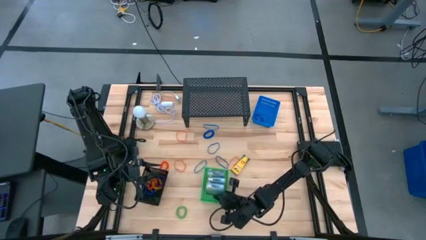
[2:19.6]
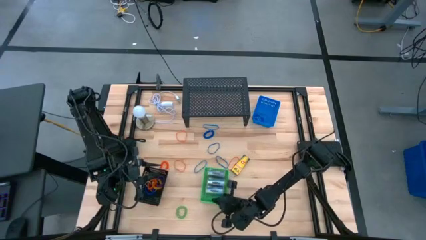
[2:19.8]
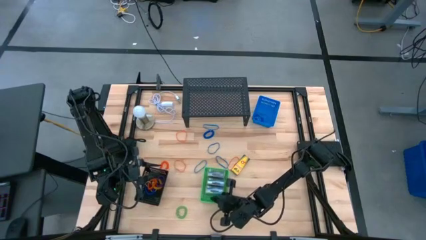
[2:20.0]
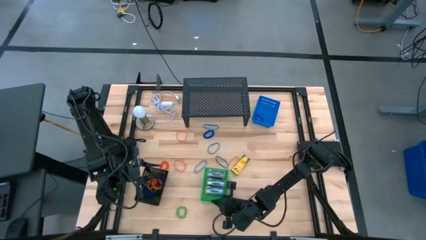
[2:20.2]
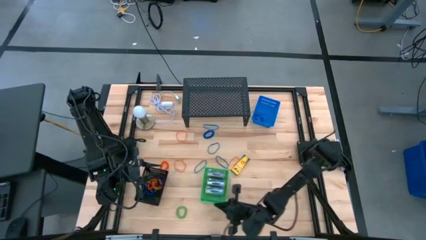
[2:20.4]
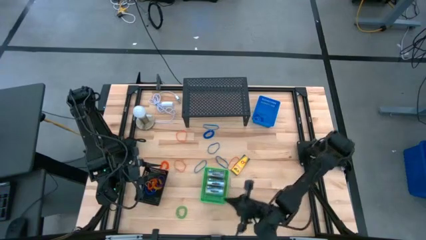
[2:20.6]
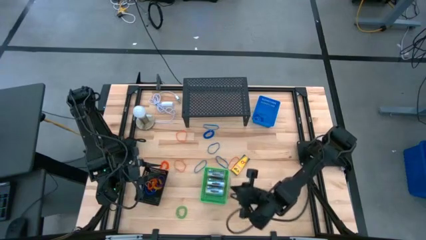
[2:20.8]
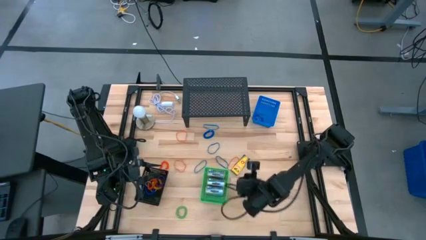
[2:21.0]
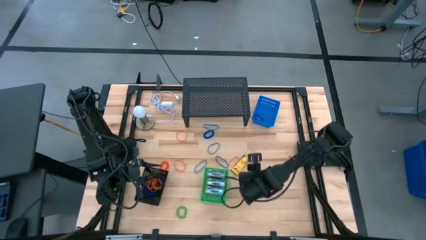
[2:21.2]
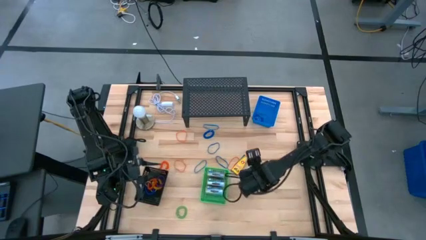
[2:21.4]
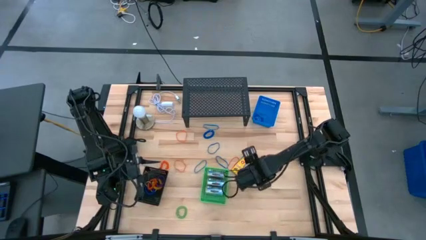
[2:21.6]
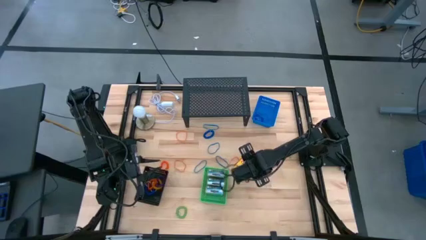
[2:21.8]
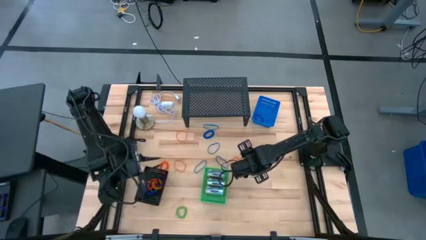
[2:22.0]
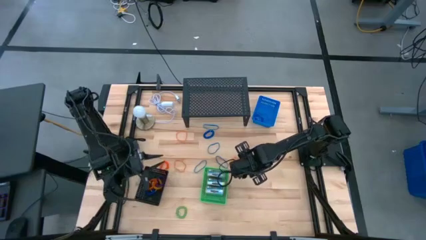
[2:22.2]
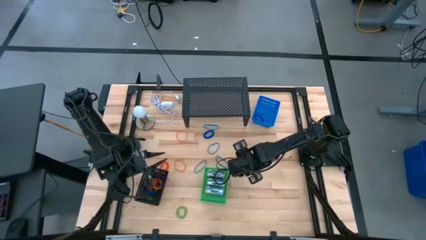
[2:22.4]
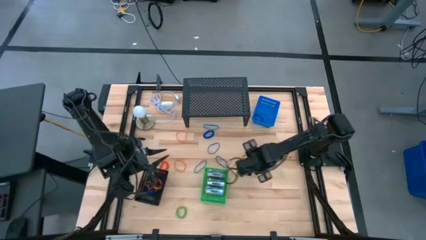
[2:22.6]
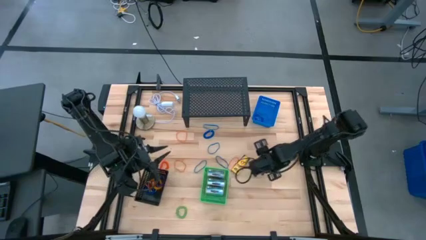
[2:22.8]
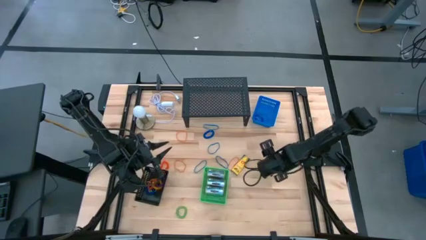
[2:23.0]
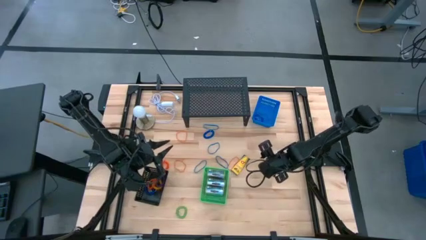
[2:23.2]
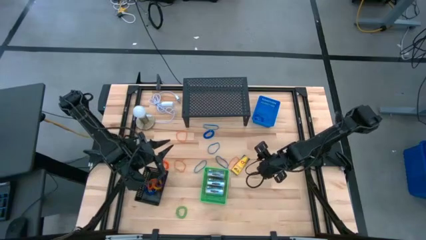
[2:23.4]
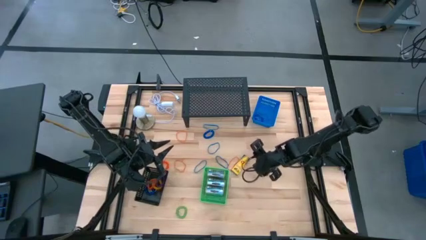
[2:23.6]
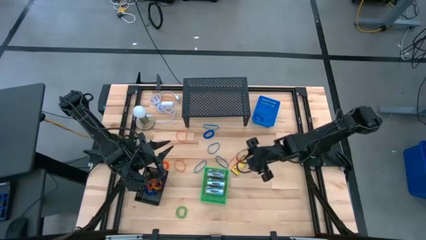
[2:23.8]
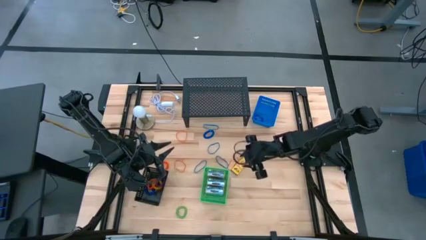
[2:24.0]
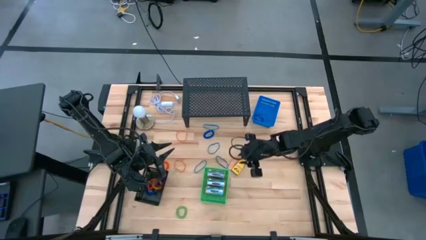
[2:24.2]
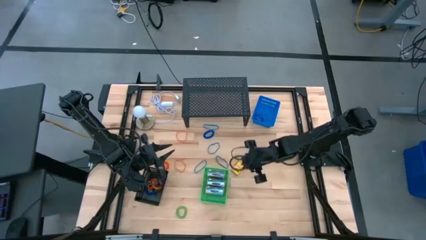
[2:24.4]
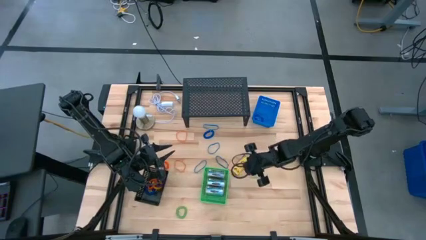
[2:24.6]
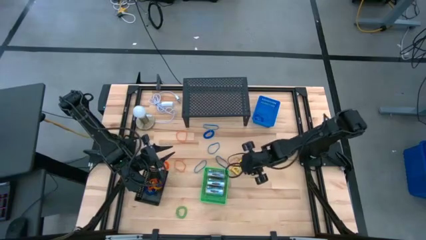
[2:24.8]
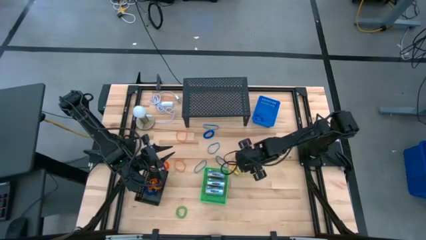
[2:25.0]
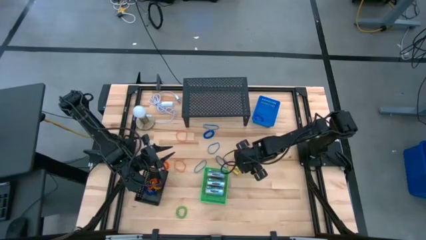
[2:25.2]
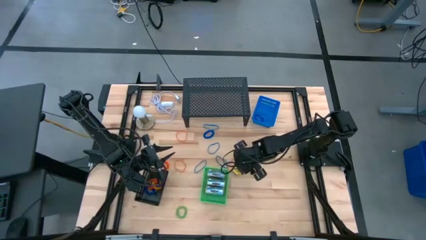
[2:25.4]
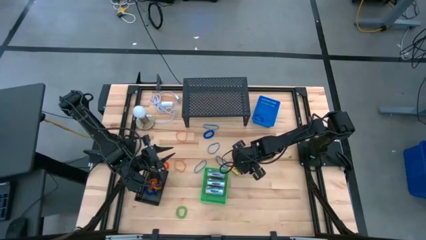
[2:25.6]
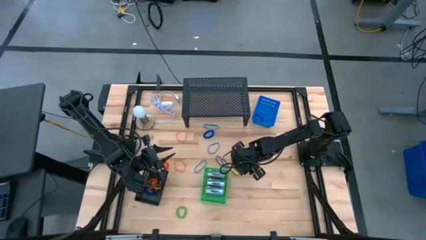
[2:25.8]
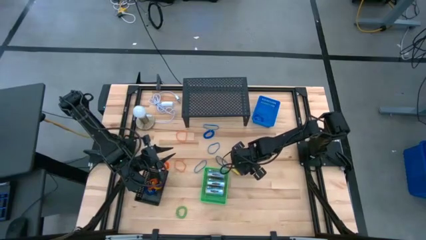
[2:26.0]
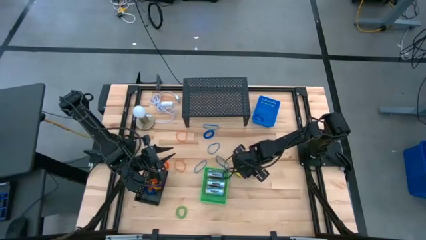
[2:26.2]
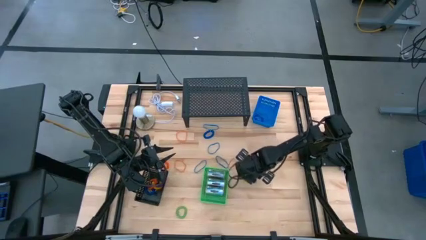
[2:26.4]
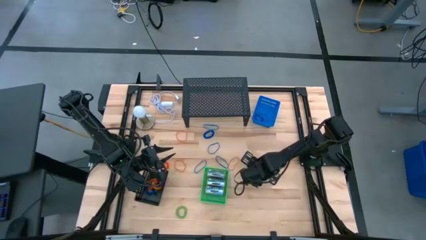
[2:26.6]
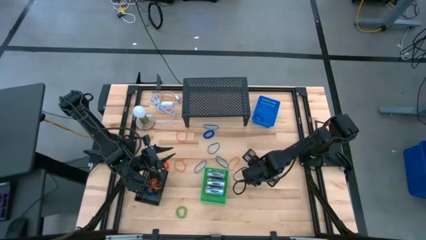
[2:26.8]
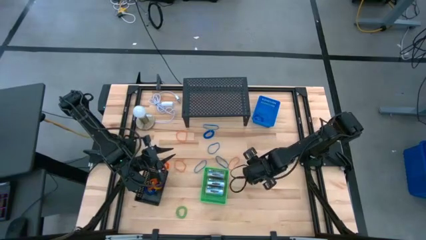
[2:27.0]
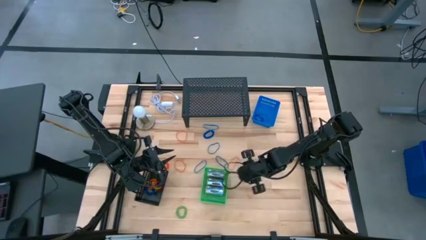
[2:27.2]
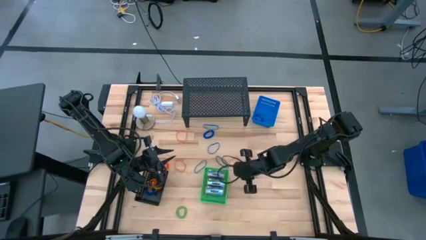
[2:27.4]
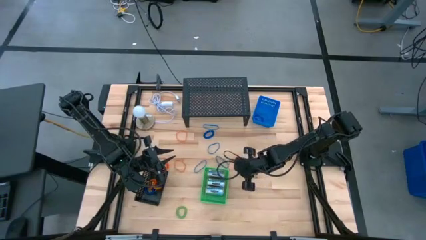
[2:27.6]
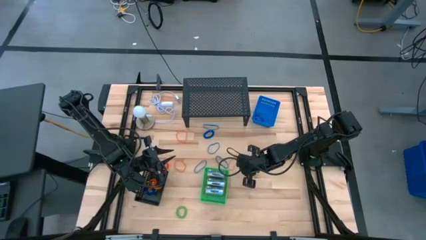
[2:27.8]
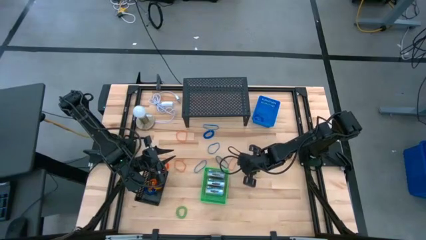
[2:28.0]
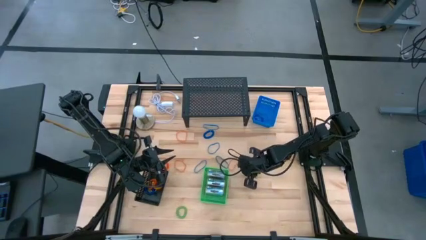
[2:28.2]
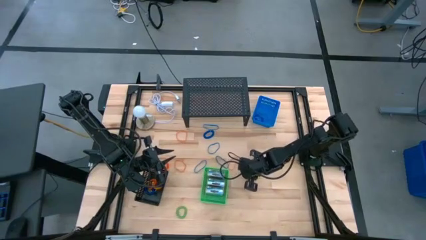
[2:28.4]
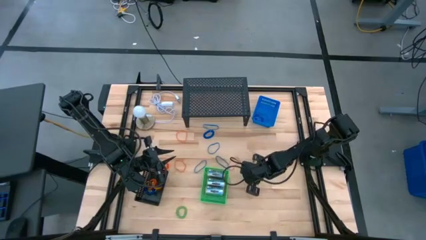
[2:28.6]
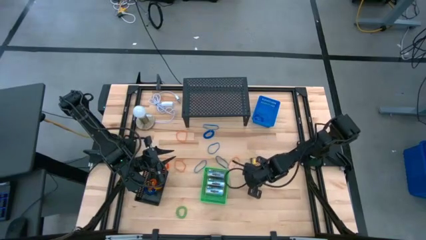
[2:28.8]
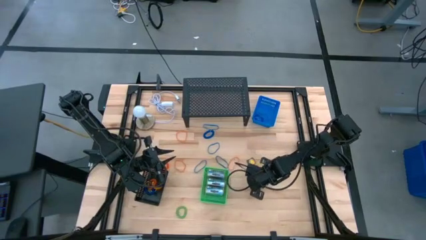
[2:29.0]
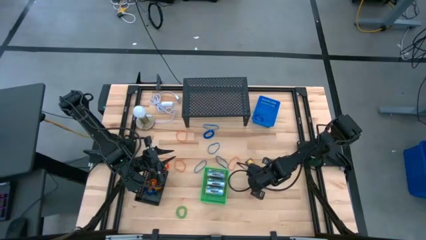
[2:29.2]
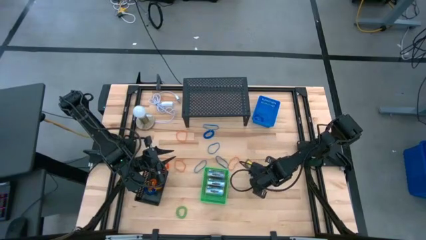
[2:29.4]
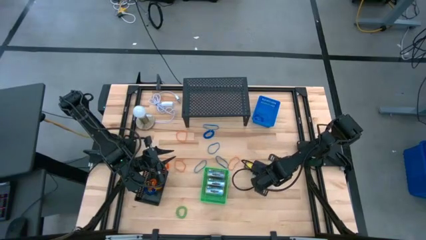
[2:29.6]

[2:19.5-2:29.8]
Task: Pick & Place Office Desk Supplies
Put the crayon box into the green bin

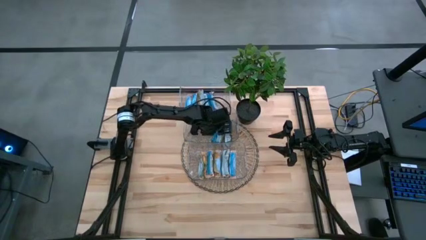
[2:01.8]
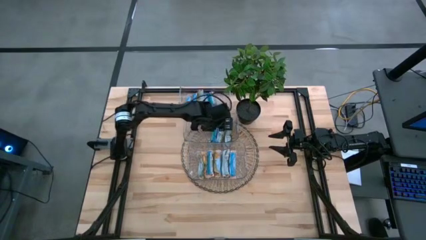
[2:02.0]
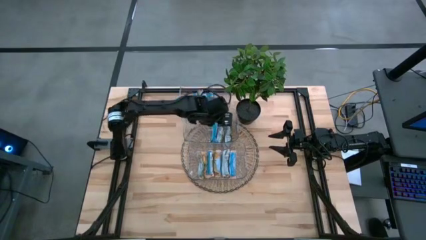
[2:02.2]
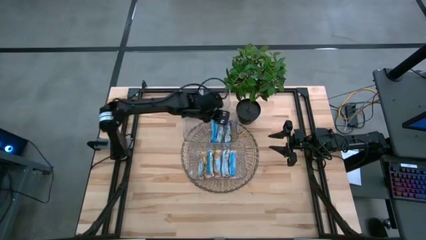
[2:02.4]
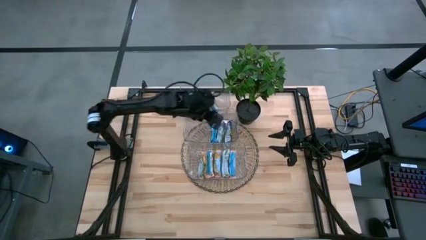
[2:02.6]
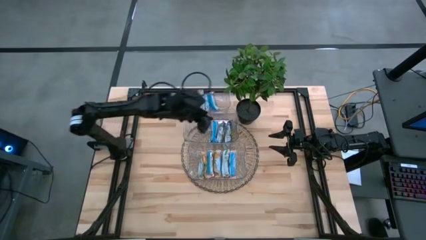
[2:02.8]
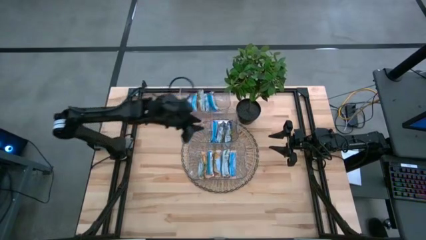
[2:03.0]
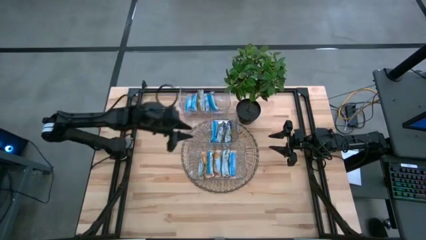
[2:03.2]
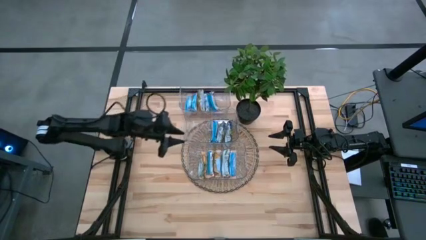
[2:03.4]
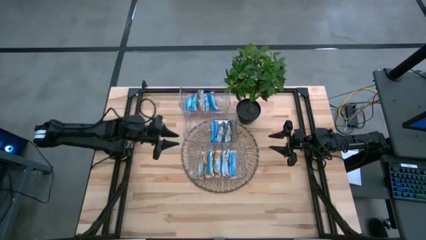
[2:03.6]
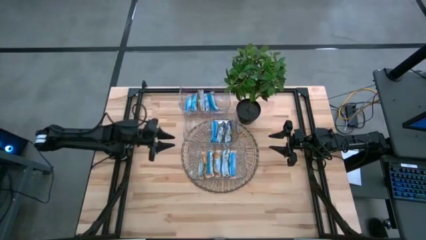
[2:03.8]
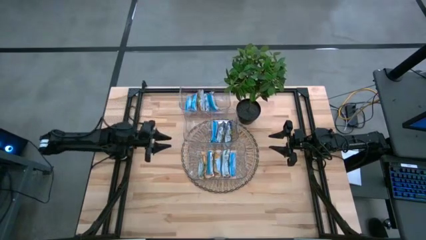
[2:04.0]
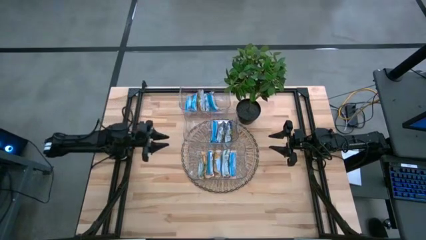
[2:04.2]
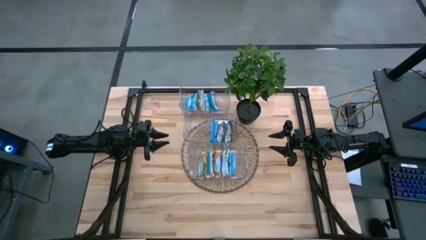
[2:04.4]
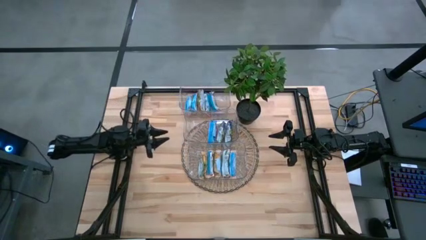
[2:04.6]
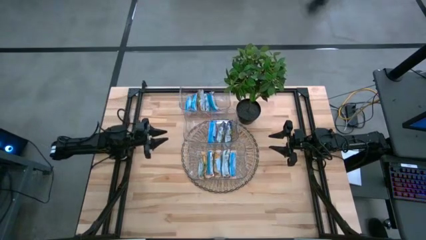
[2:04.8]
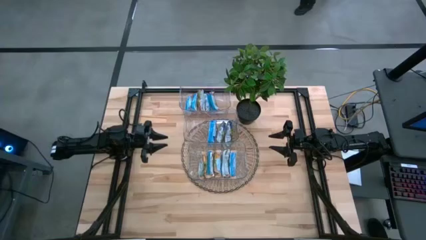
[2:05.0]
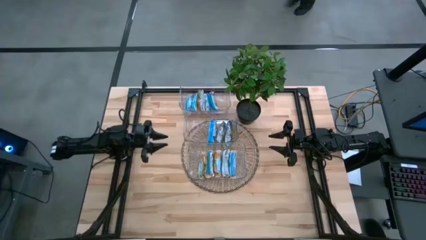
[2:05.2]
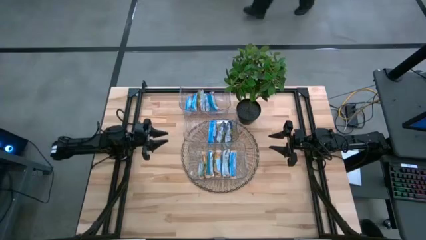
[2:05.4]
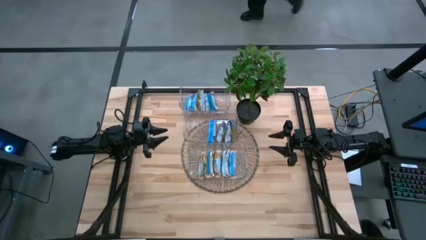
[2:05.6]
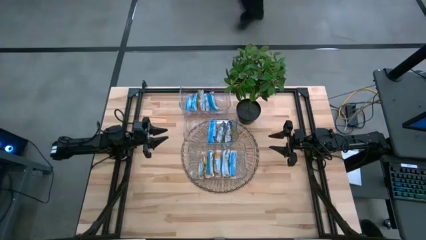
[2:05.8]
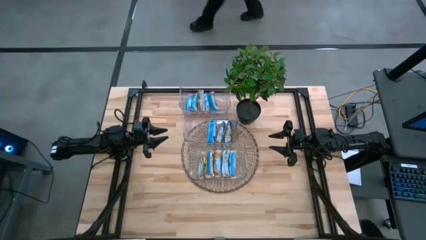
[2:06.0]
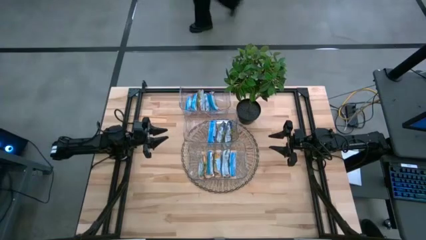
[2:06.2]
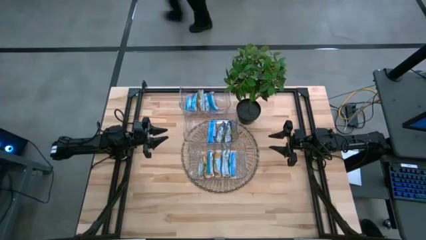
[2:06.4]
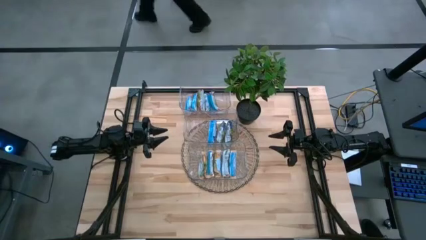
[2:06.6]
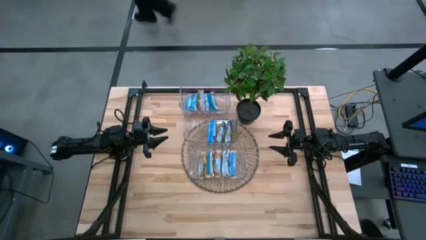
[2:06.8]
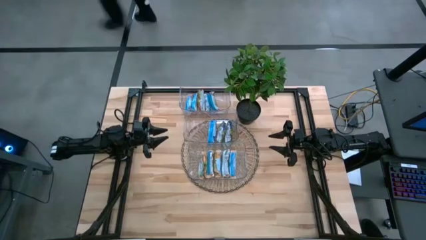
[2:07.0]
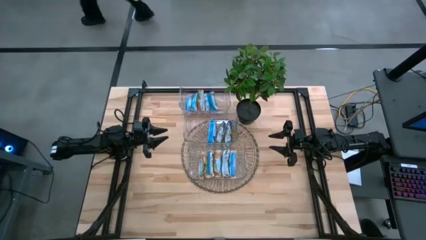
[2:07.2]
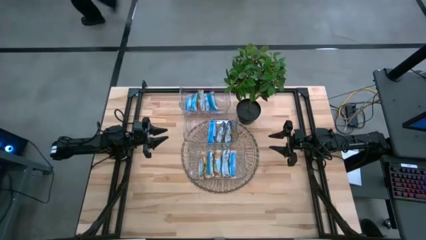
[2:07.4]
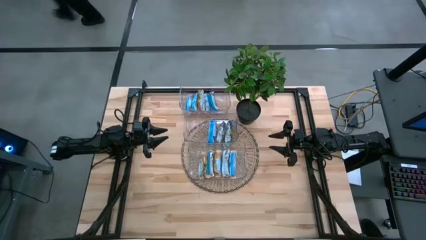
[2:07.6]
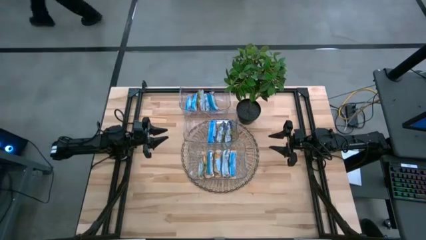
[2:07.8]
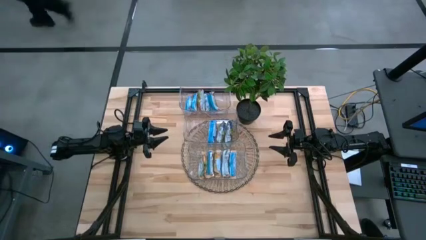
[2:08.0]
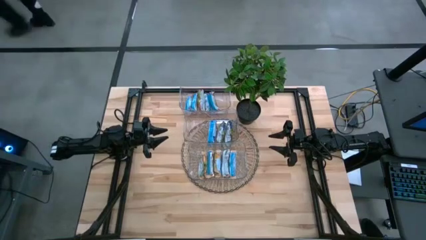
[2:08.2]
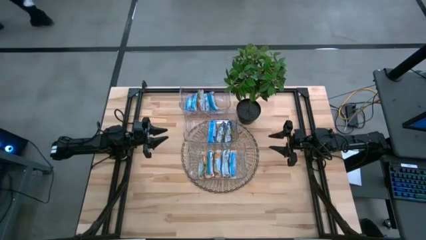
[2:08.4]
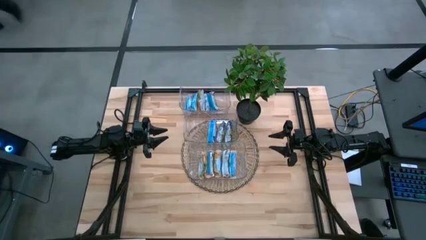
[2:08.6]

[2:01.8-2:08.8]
Task: Pick and place Granola Bars by type
Return to Home Position
